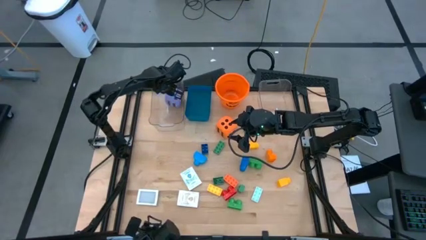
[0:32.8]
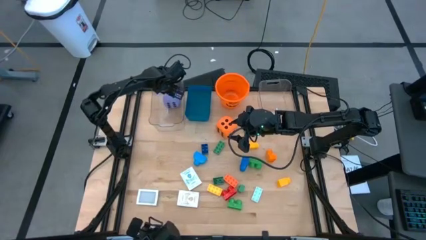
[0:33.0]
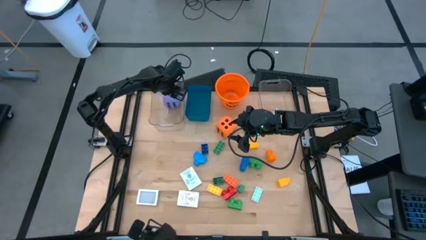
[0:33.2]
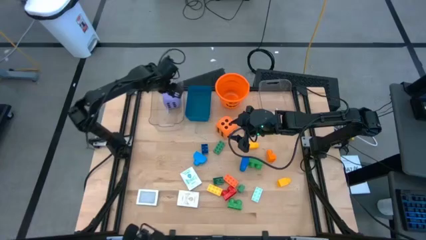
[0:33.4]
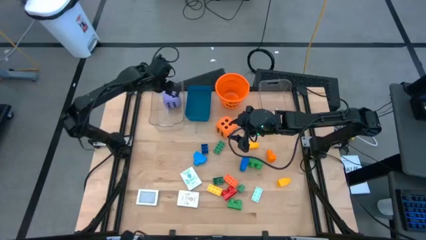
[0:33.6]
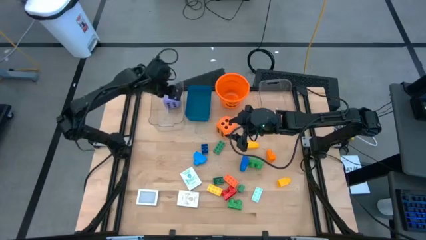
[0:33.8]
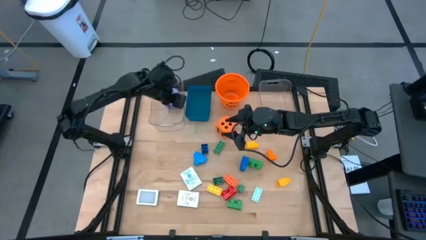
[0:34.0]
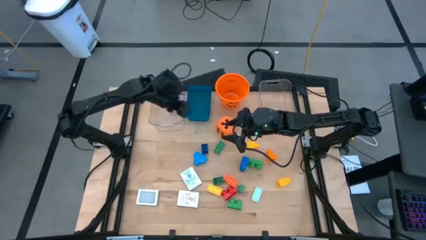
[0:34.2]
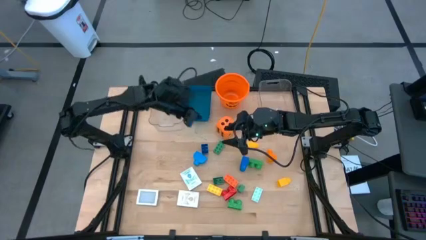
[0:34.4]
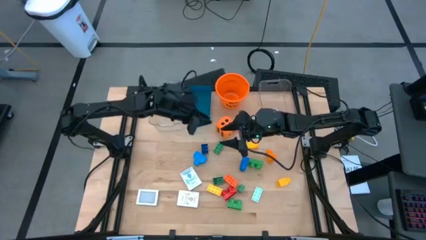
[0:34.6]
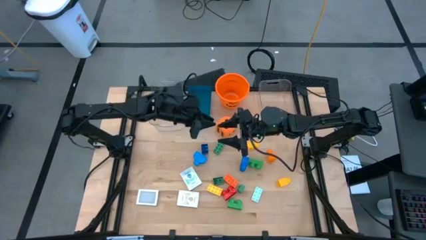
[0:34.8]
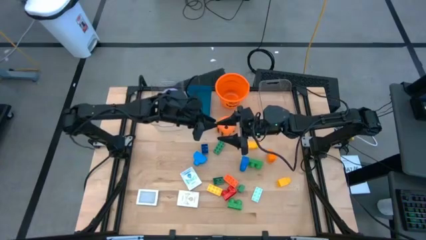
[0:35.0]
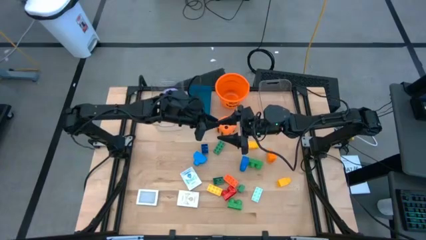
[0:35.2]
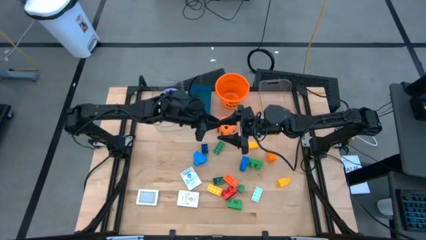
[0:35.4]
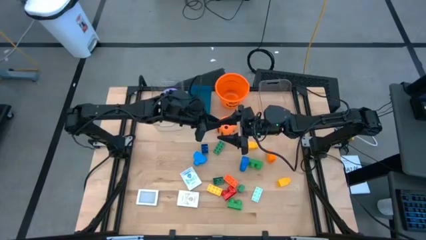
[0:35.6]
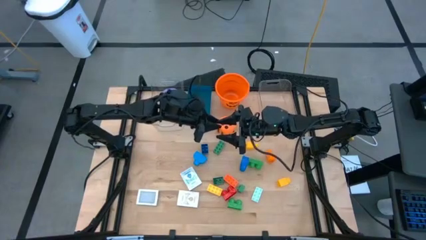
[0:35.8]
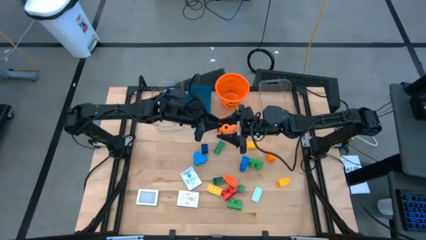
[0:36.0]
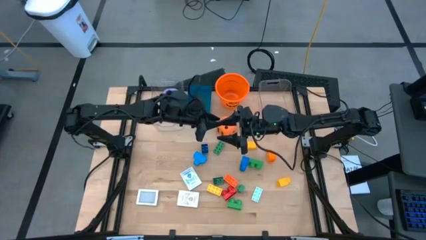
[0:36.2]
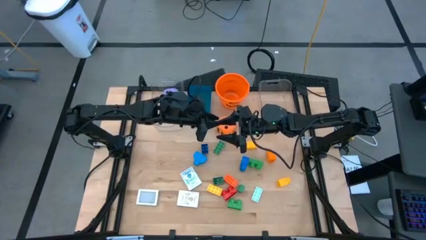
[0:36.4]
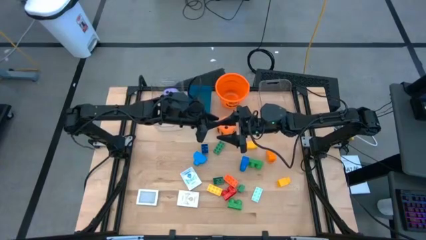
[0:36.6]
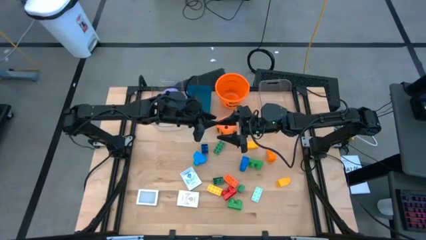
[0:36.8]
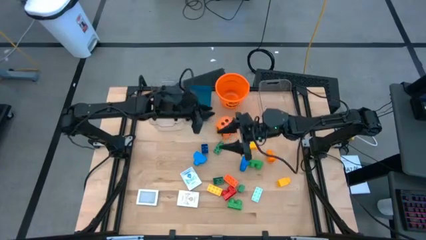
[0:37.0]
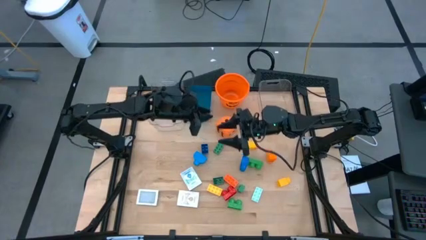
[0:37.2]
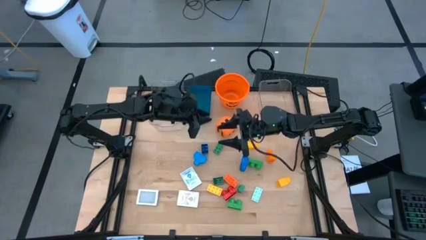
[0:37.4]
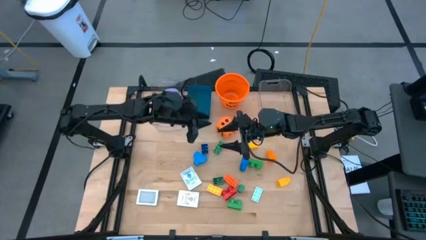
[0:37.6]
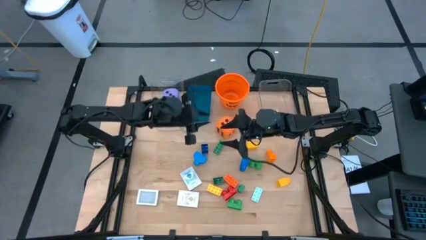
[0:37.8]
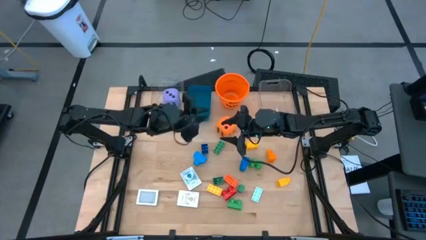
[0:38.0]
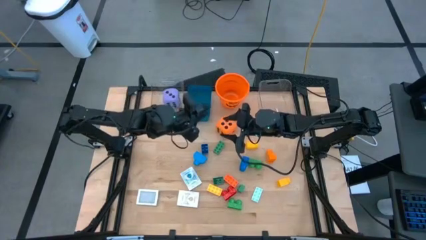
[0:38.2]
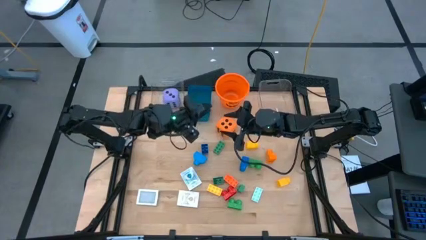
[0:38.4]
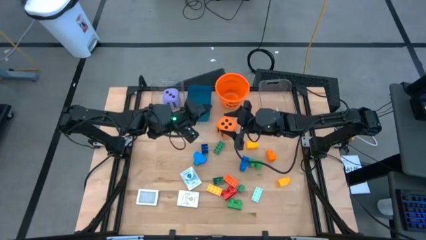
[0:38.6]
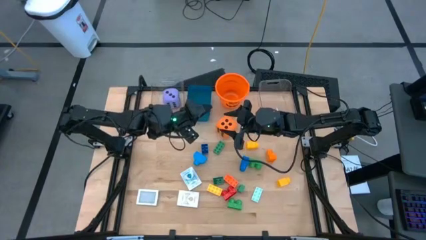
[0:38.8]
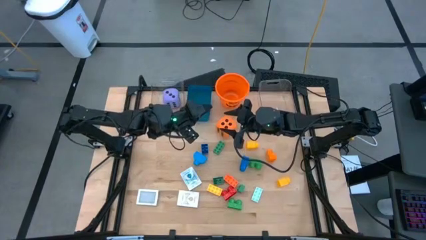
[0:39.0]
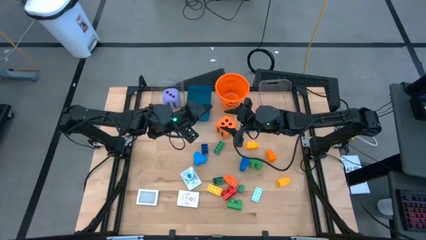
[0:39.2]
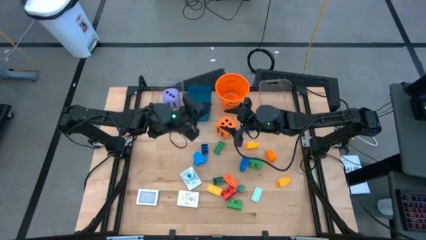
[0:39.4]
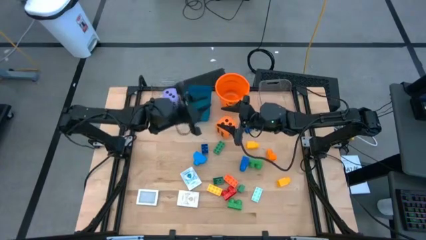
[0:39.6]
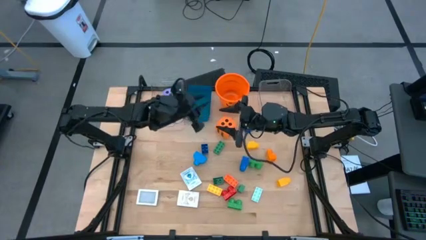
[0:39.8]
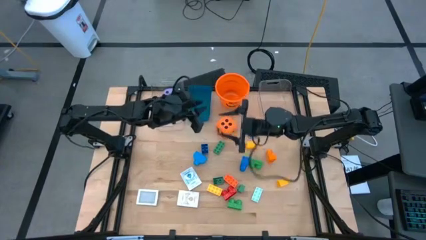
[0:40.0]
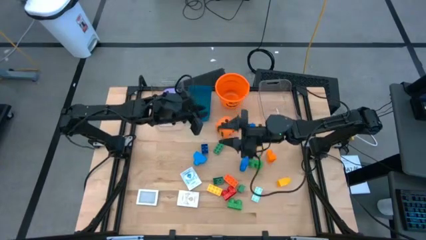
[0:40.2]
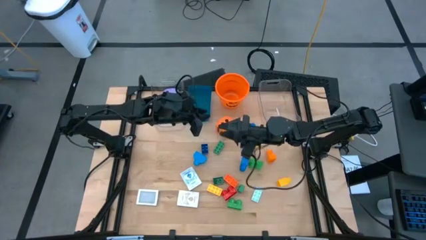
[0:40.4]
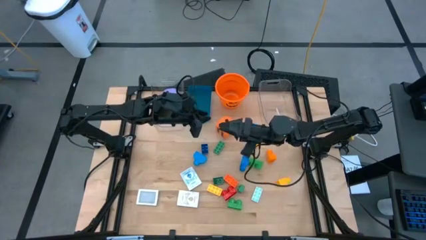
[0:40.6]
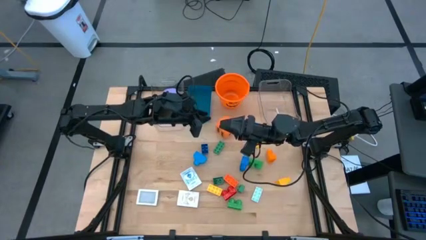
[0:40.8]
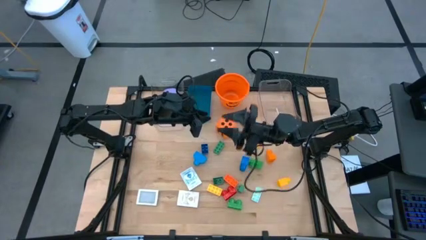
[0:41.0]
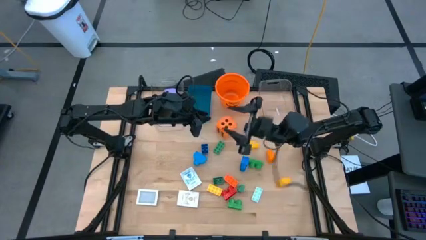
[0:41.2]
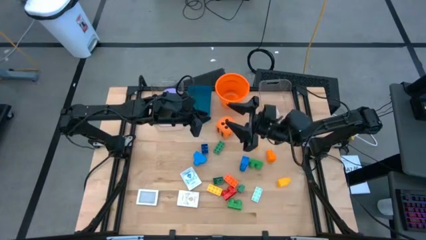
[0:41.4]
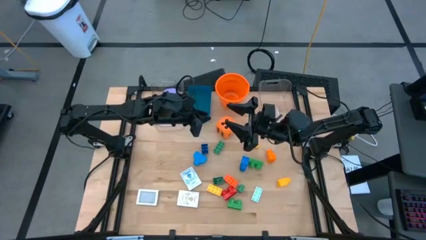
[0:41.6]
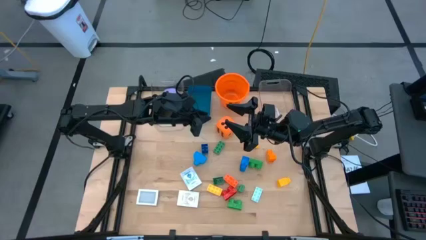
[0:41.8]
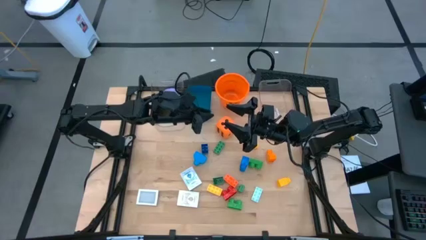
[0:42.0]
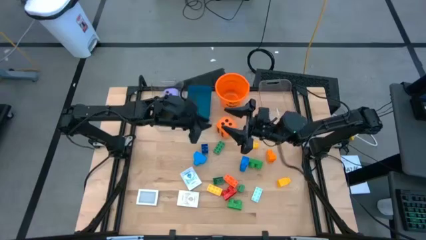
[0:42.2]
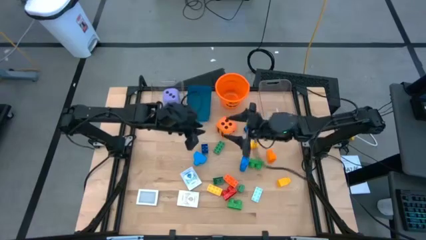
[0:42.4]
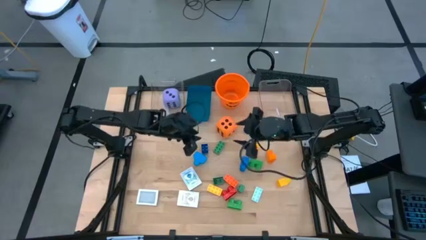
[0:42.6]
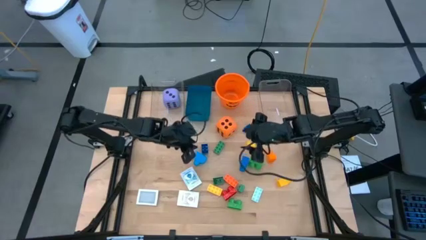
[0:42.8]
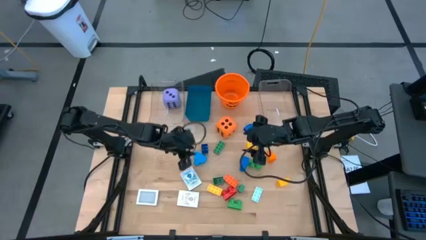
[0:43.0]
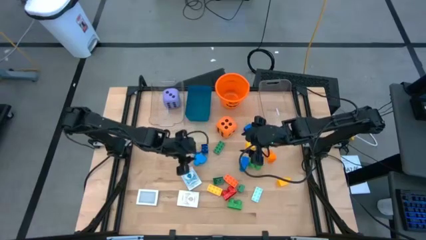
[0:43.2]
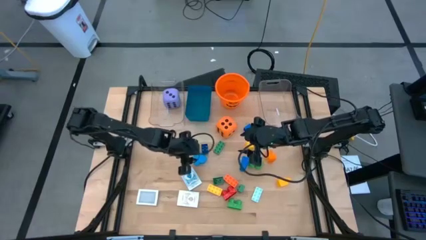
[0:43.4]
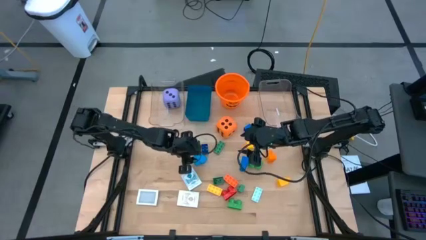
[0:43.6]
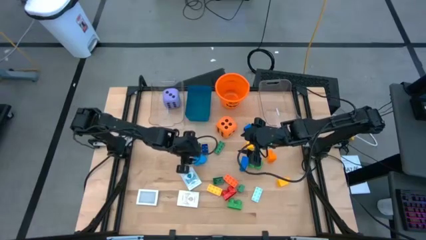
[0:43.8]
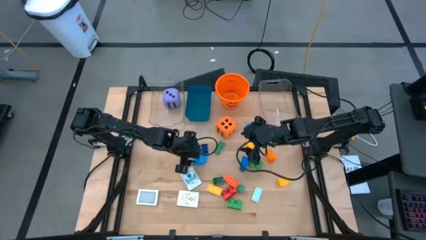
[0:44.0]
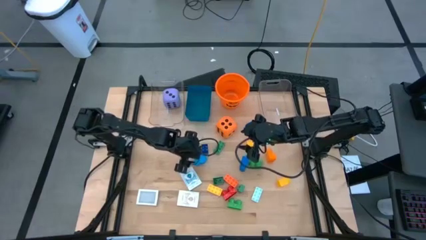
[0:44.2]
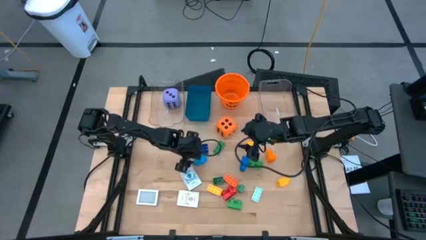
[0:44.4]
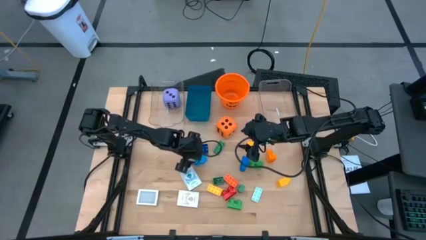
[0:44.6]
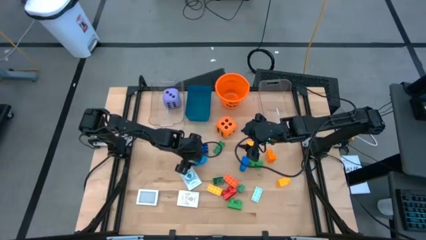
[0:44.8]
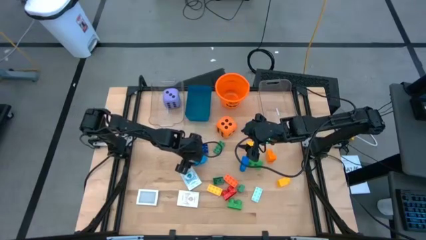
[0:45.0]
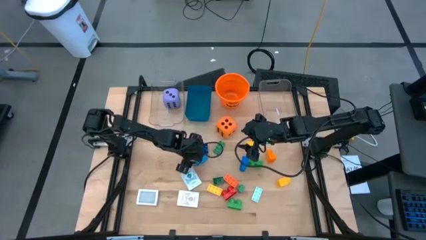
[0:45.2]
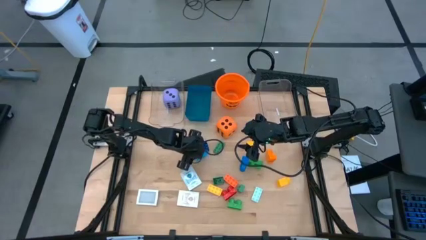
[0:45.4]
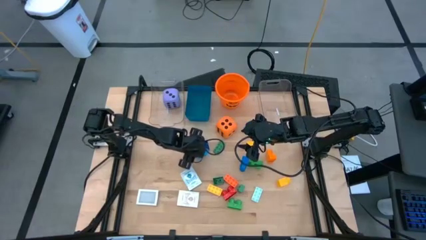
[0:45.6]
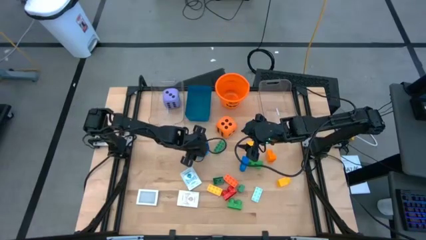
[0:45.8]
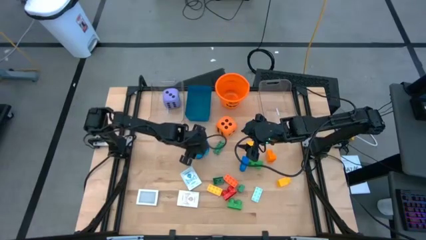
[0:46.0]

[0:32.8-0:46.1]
Task: Pick & Place Toys
Put the blue game piece into the right transparent bin
